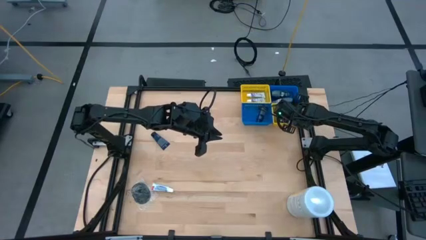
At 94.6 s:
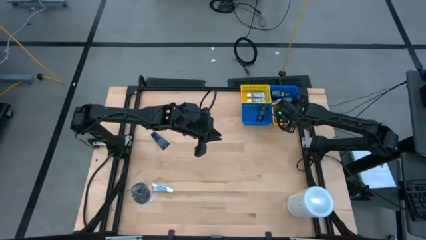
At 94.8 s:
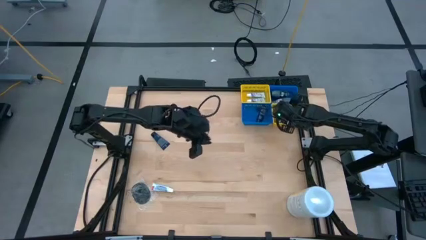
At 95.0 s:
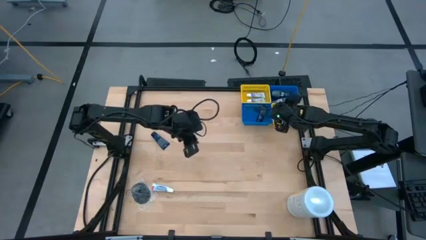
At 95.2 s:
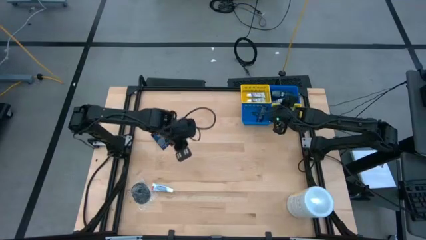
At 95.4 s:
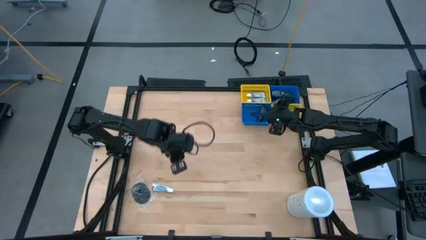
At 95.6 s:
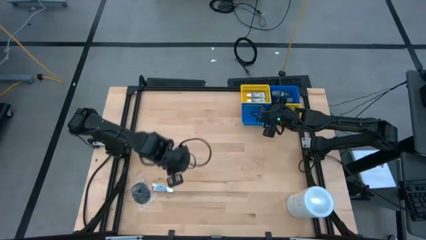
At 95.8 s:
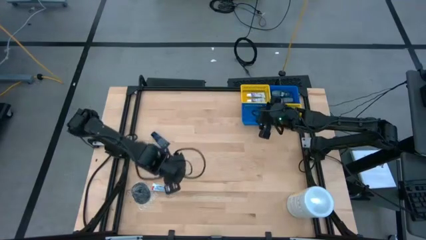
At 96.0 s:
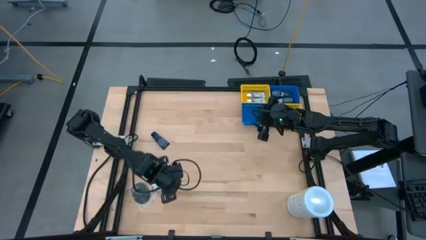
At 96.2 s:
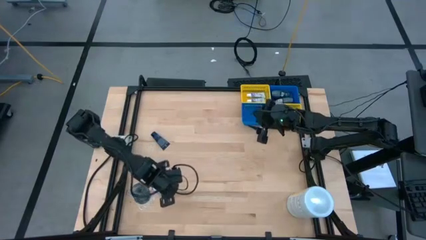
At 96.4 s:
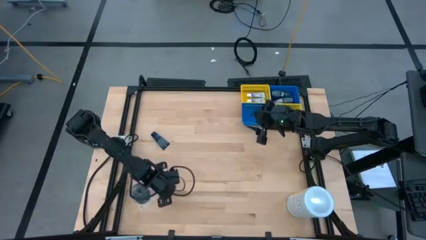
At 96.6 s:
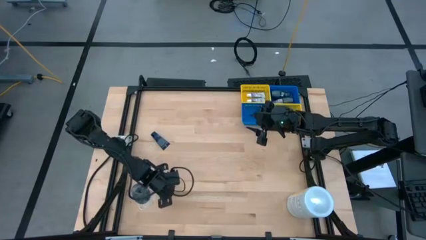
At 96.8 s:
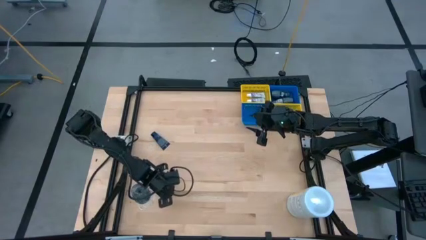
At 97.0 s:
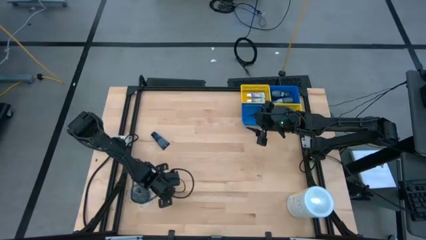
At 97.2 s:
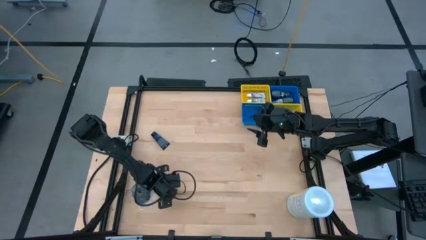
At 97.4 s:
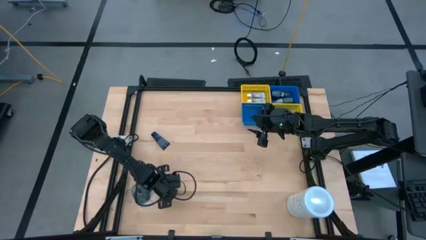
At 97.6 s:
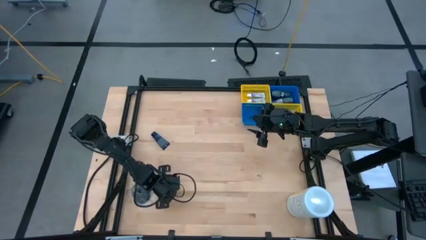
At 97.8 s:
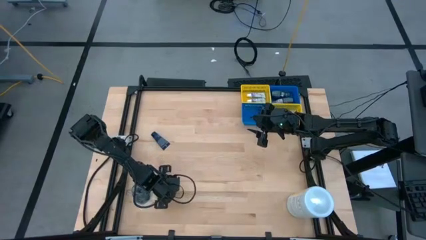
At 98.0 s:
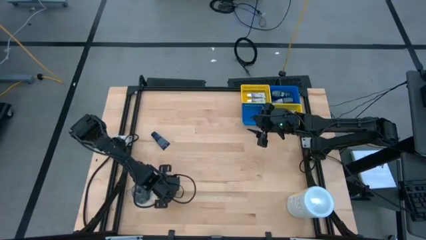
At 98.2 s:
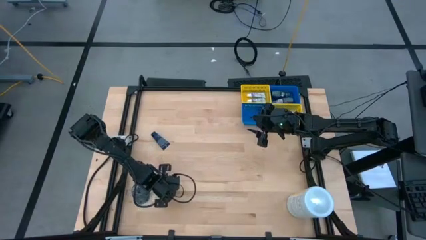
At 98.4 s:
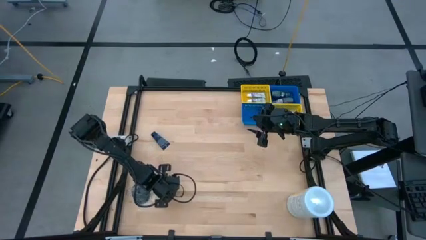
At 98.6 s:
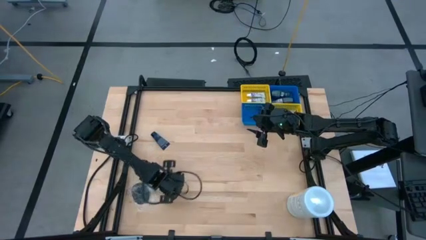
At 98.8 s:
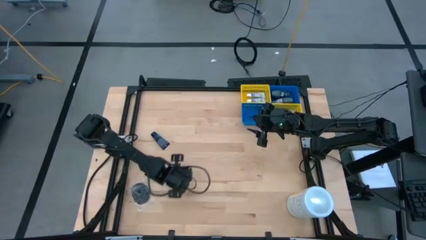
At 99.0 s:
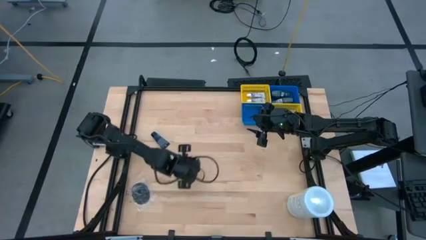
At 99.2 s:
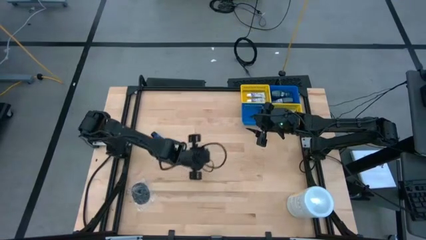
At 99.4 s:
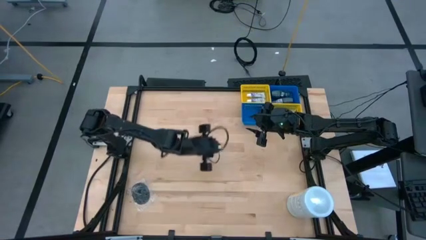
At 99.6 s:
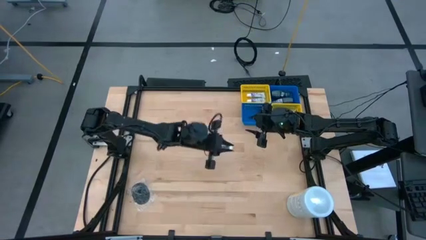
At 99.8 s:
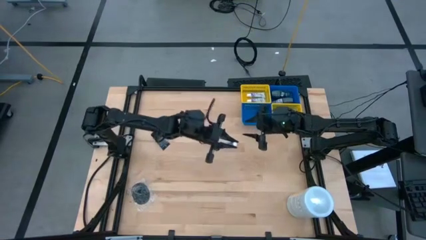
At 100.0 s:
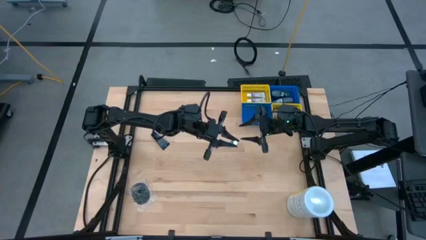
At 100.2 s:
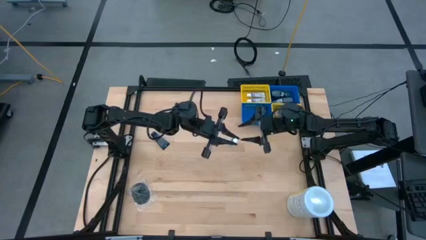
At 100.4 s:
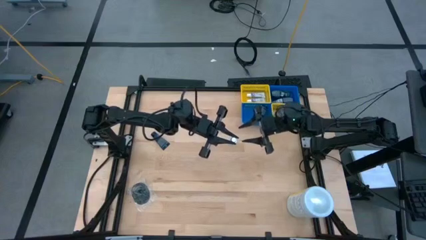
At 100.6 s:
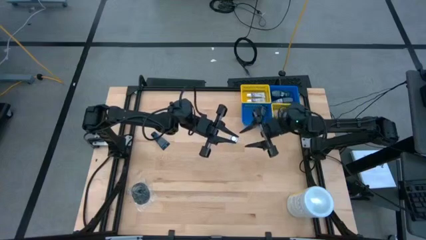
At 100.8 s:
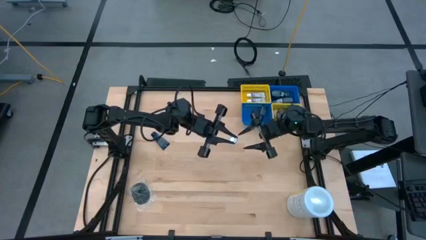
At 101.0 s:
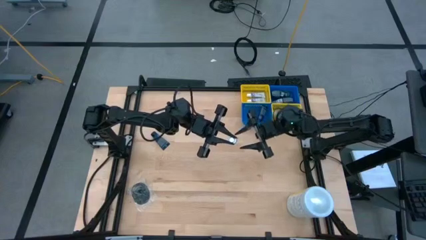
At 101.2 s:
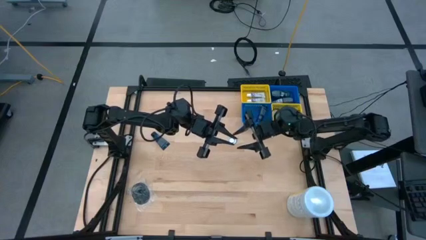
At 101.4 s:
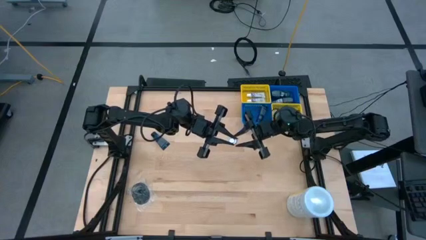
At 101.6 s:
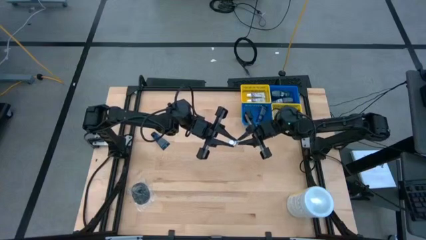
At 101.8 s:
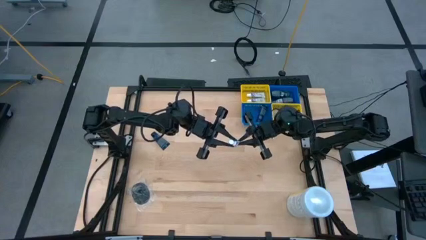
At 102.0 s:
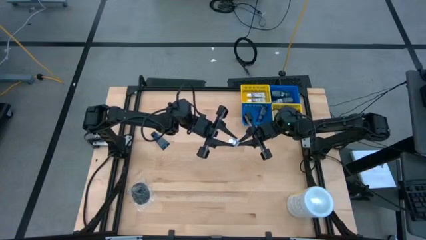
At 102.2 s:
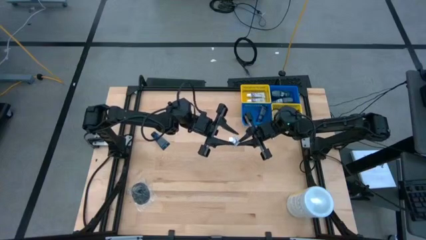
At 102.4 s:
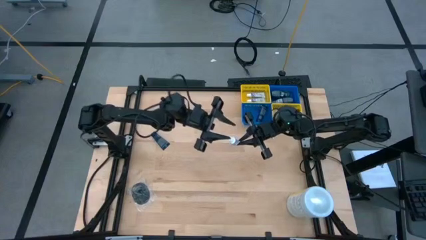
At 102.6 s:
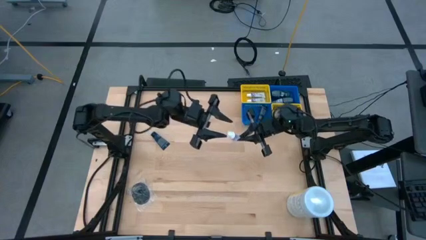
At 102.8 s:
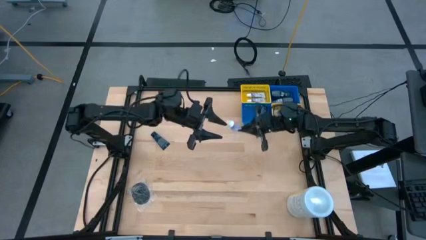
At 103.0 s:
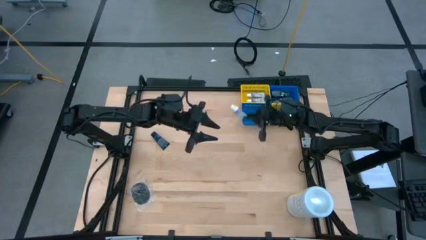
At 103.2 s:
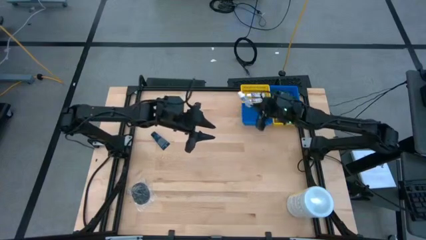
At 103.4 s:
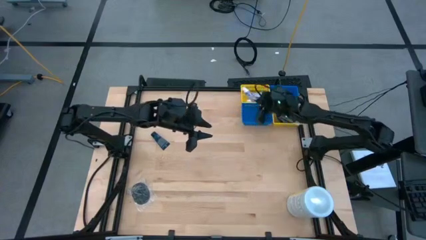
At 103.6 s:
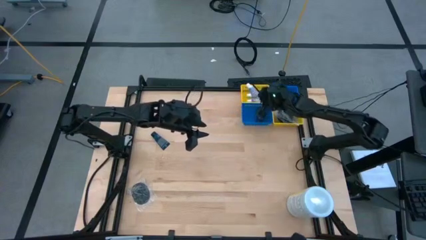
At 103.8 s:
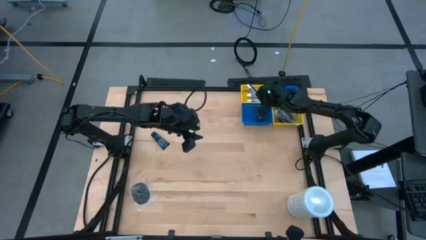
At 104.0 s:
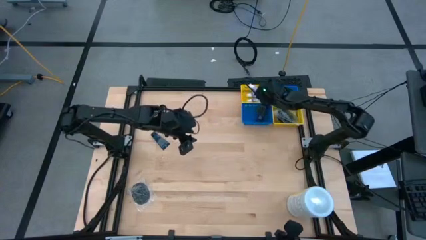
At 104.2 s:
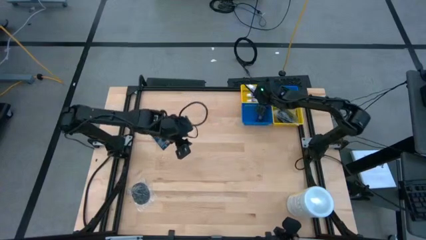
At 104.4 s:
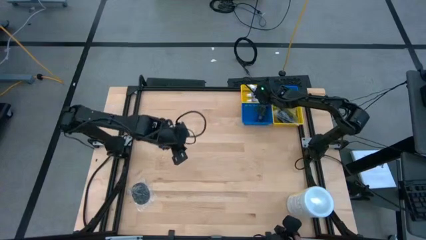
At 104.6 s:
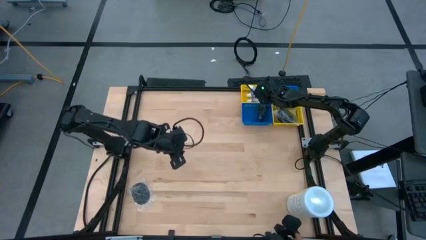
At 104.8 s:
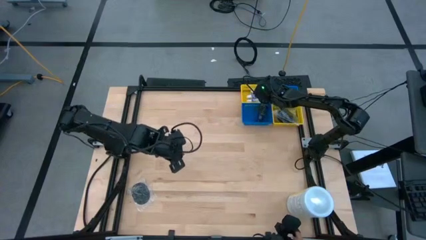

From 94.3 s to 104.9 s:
Task: Pick & Place Travel size toiletries
Put the white toothpaste into the top yellow basket
